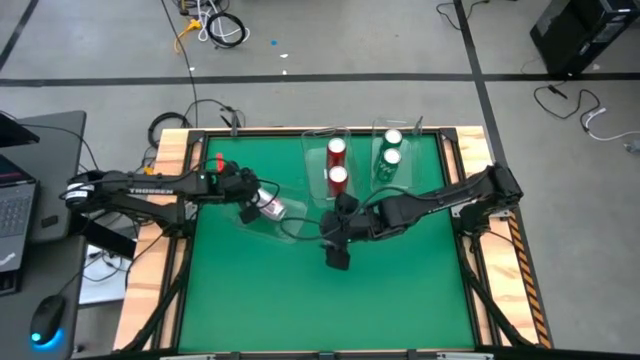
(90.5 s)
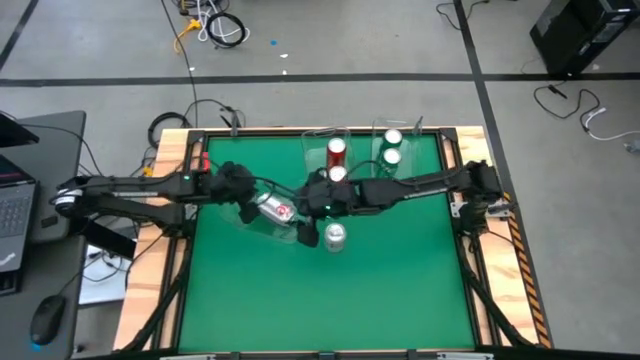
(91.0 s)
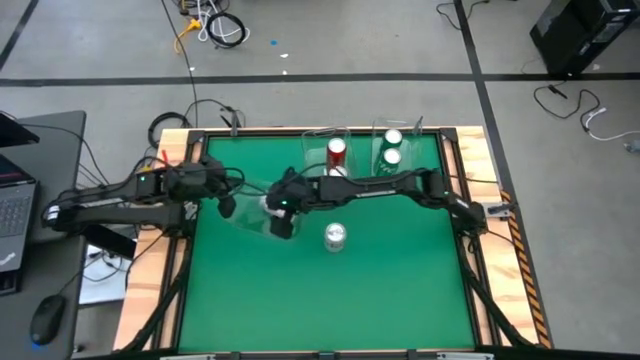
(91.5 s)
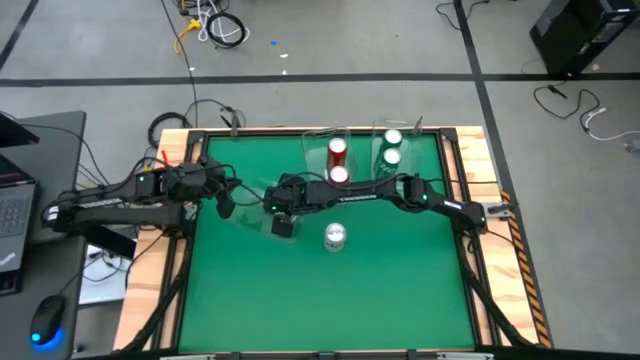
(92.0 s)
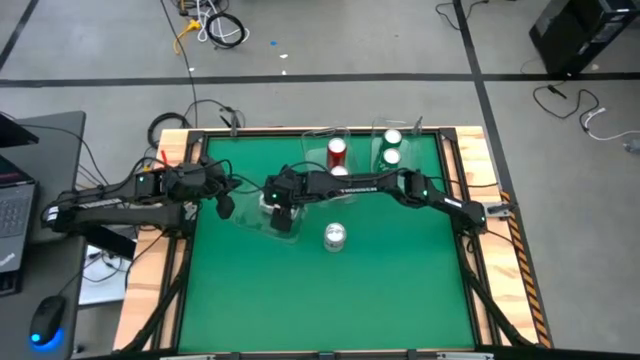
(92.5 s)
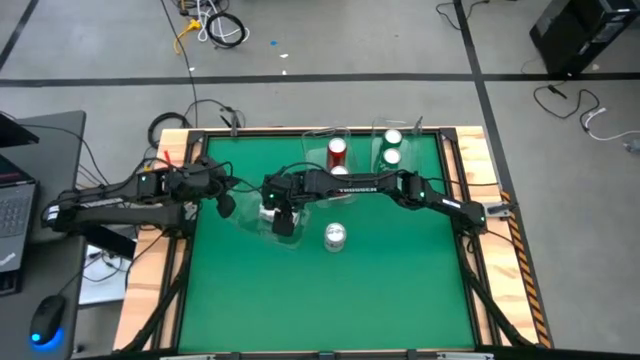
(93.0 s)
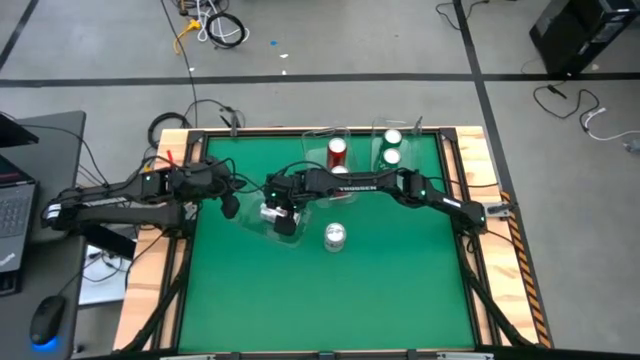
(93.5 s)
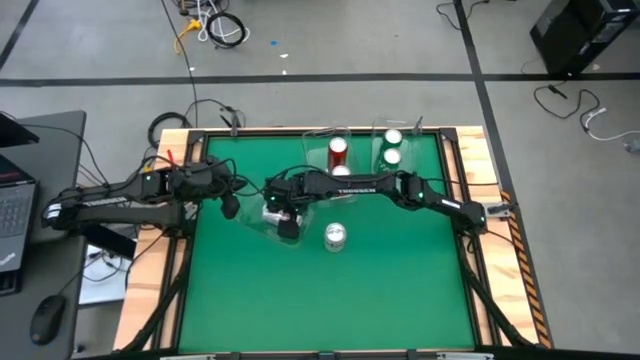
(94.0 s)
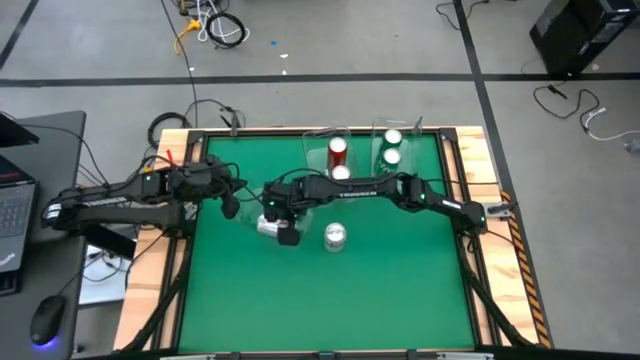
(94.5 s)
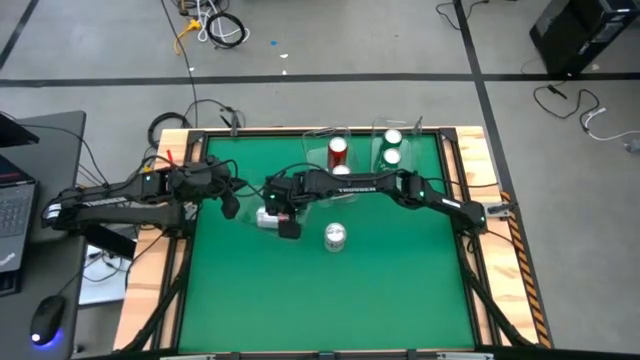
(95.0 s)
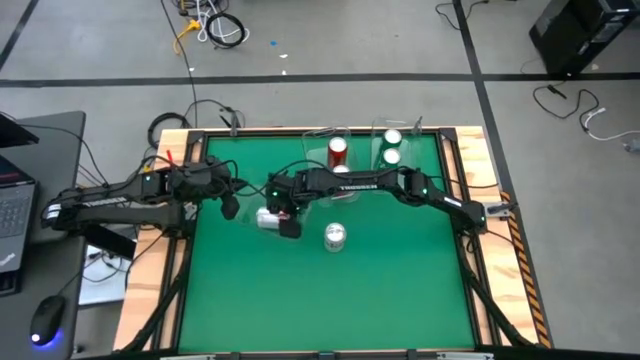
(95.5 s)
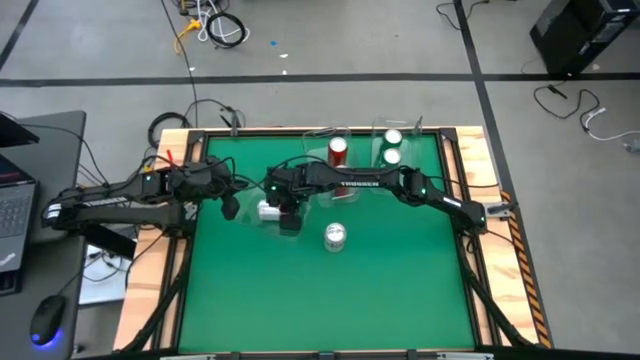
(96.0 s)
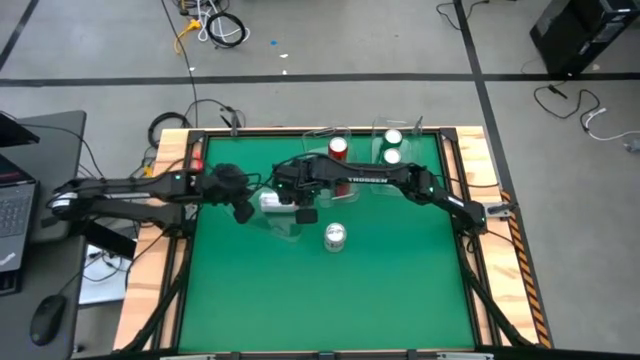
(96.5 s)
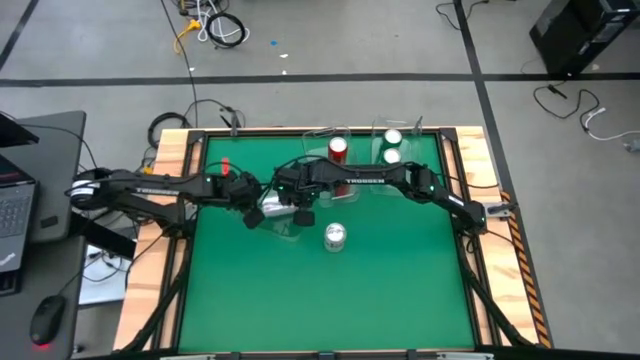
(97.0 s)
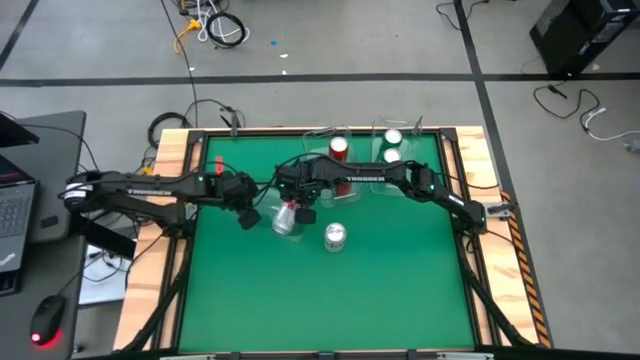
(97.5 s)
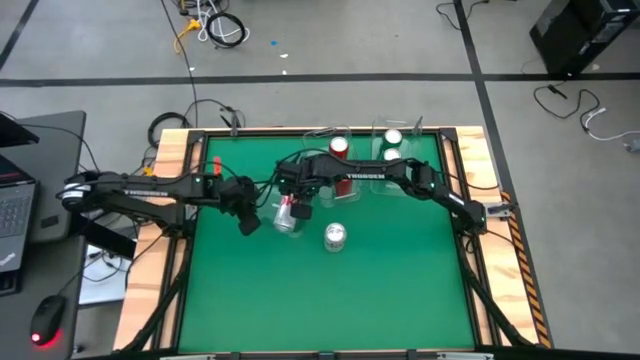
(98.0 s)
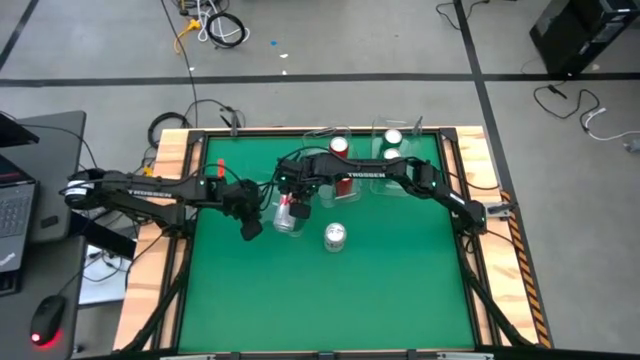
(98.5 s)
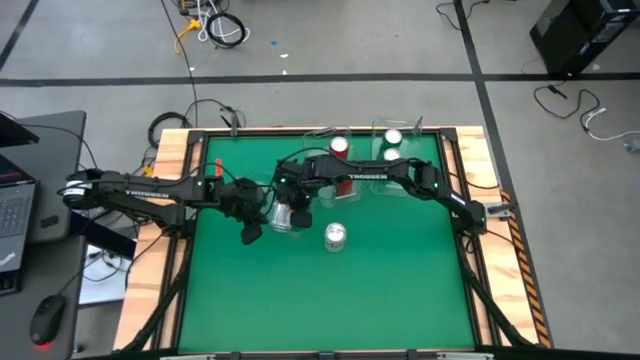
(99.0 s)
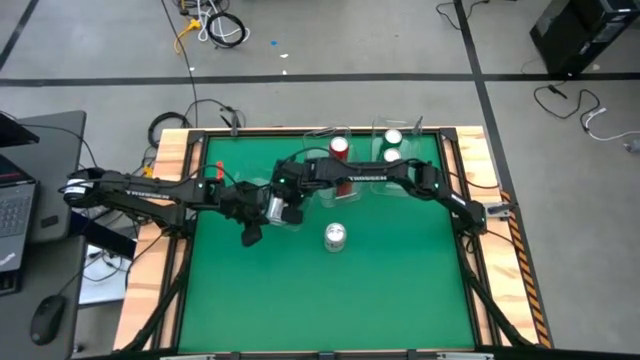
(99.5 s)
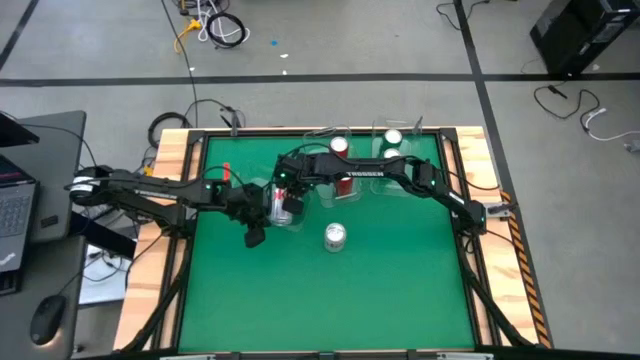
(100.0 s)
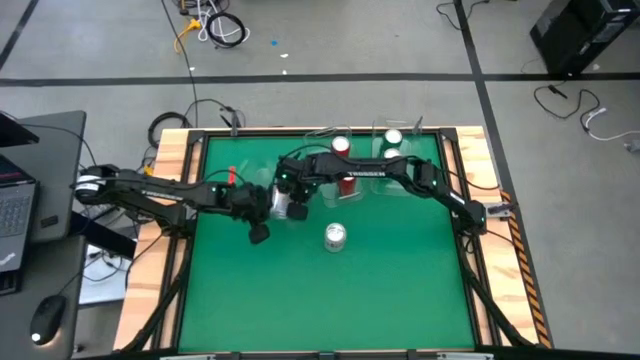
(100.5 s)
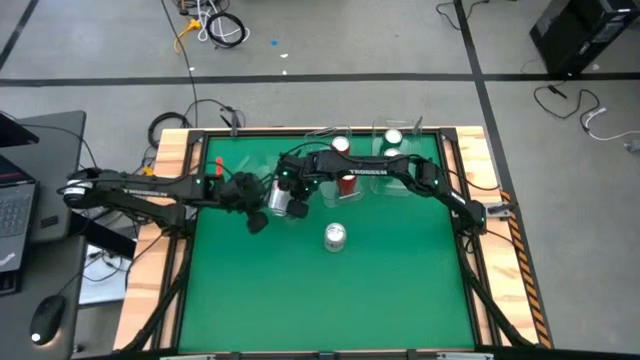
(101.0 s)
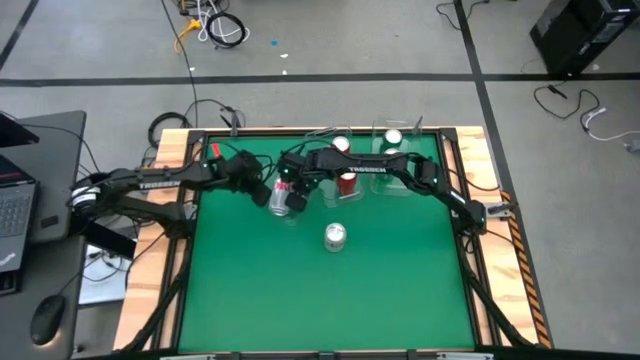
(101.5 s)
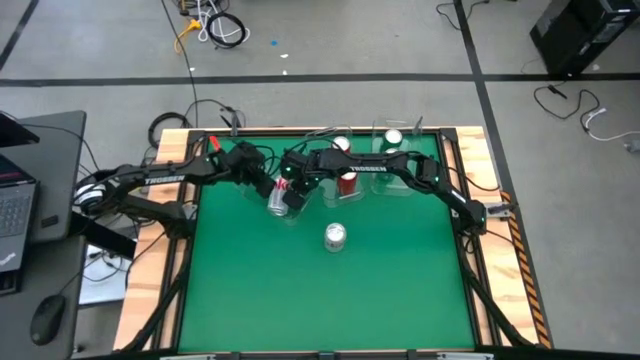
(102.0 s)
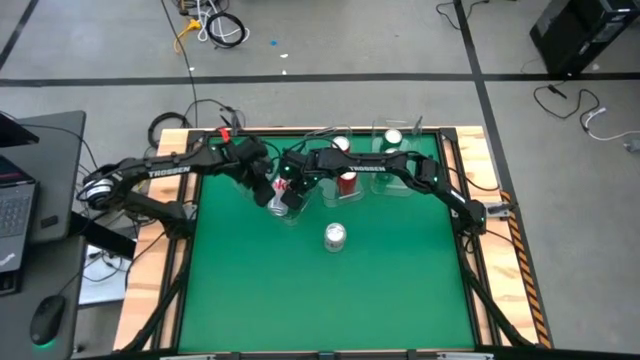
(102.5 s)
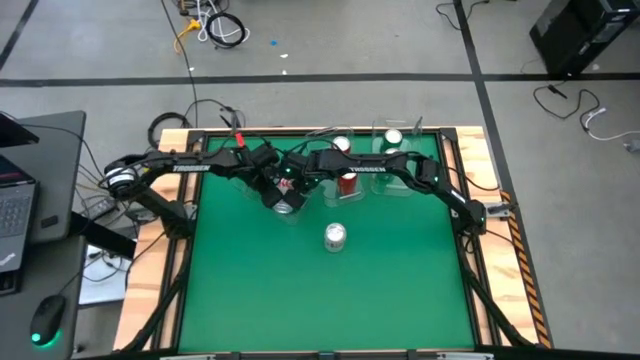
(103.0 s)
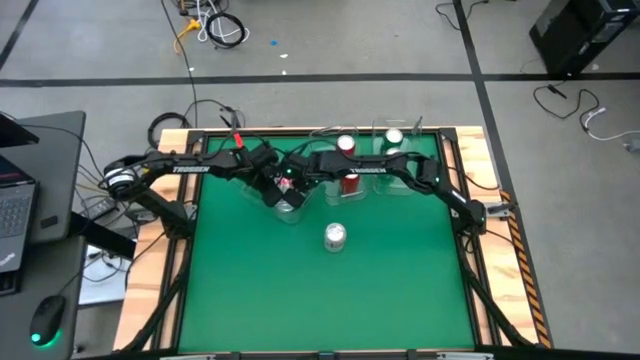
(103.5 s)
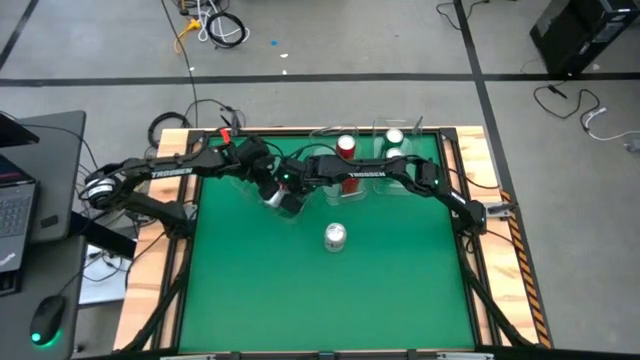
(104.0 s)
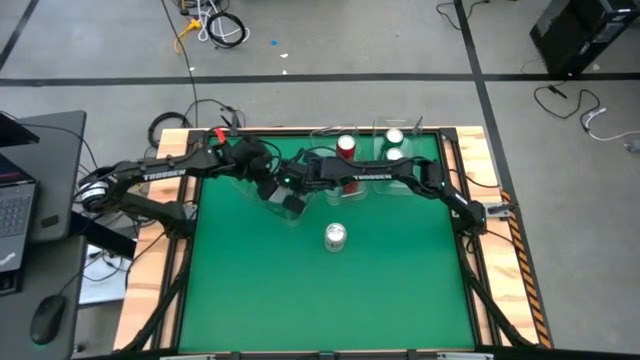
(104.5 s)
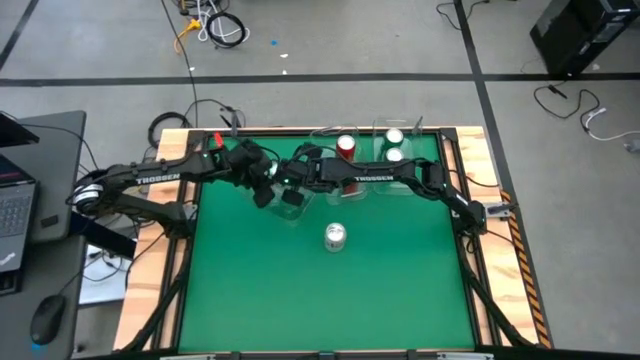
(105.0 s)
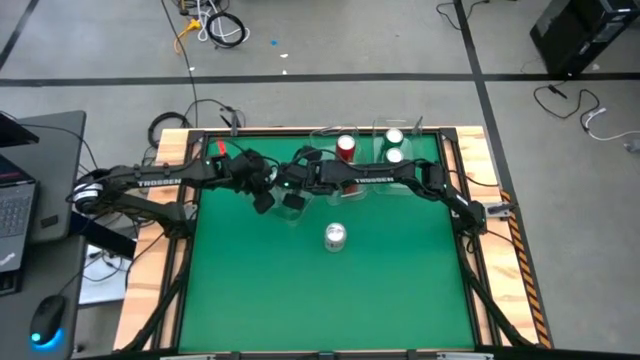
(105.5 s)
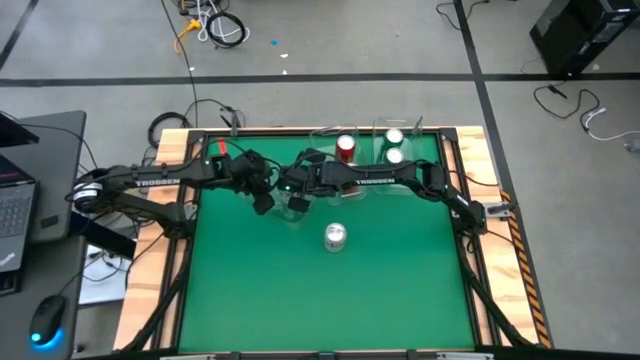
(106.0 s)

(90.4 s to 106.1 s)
Task: Sort soda cans
Adjust the red-silver soda can from the left transparent bin

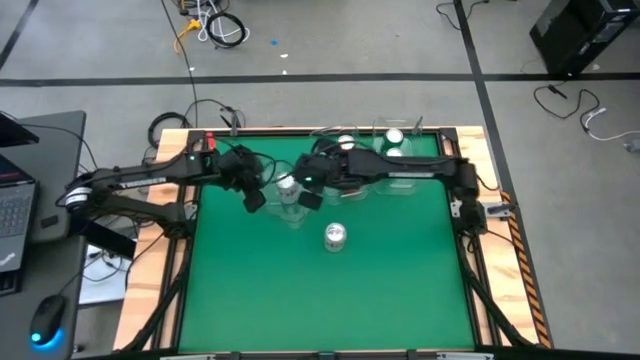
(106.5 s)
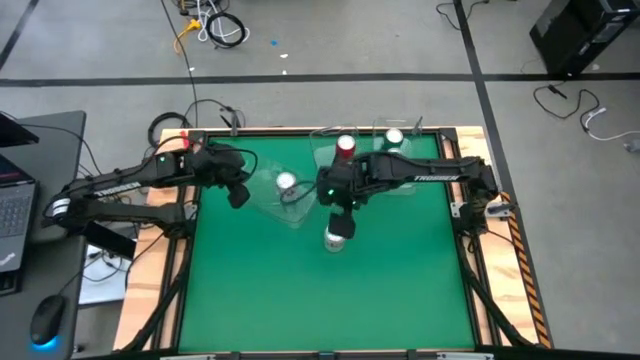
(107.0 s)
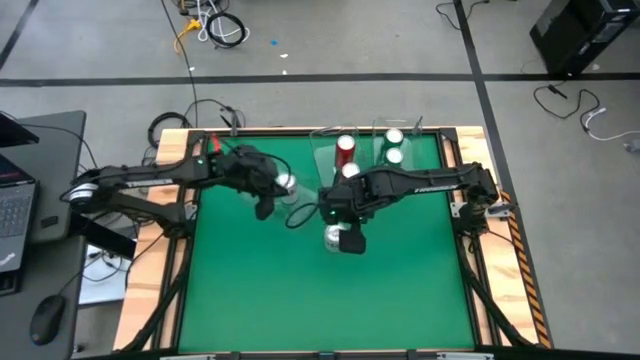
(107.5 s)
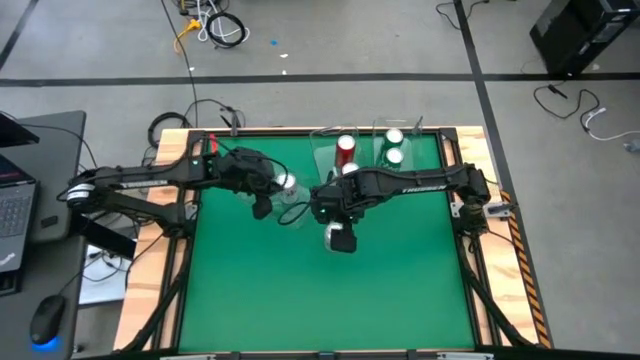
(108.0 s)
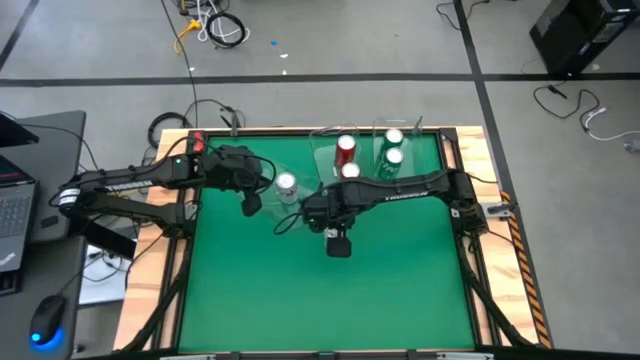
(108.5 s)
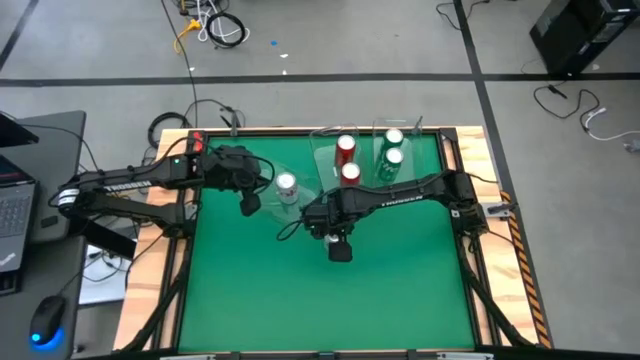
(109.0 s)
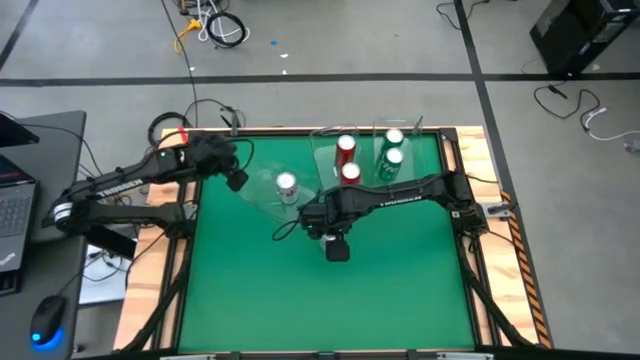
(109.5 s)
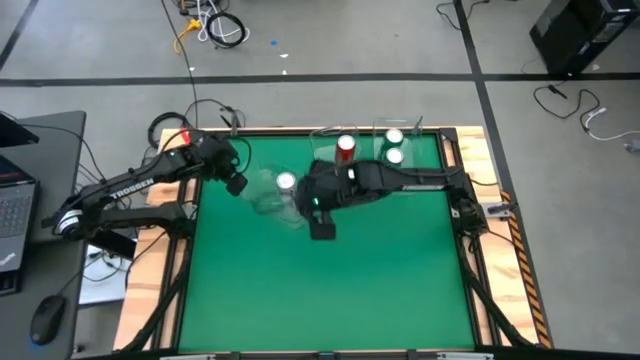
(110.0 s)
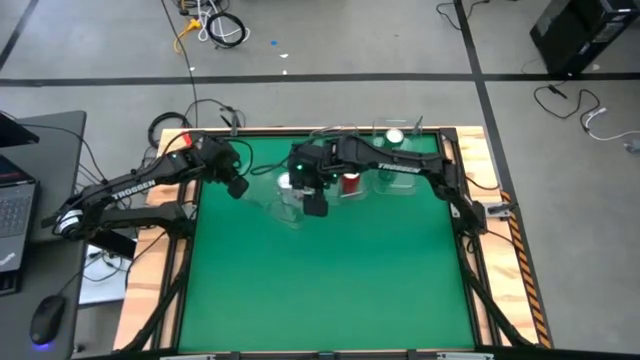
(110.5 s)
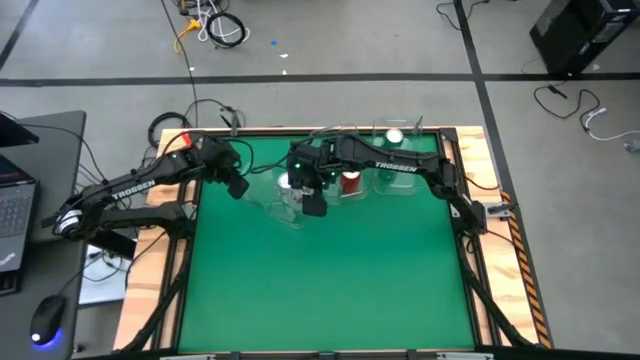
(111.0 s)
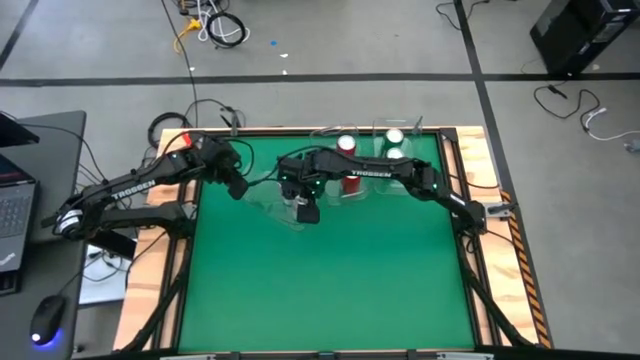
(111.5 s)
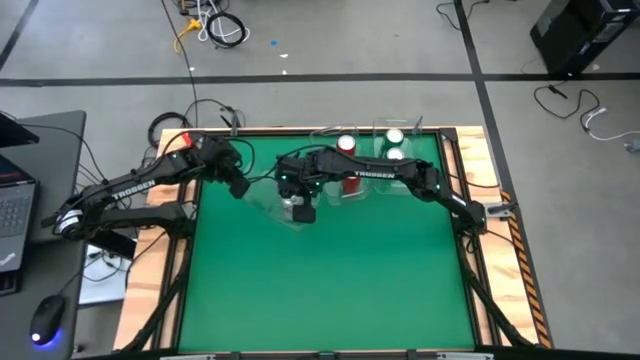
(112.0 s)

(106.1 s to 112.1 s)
Put the red-silver soda can into the left transparent bin
